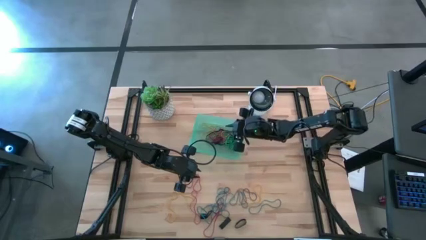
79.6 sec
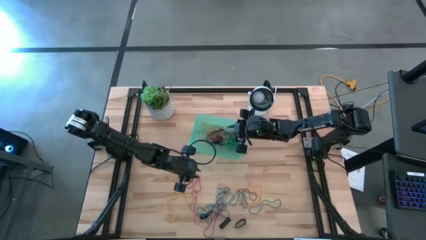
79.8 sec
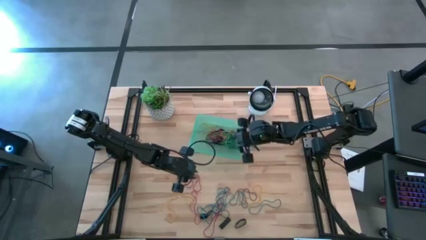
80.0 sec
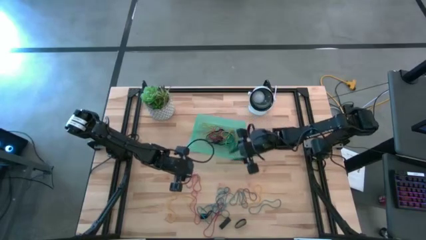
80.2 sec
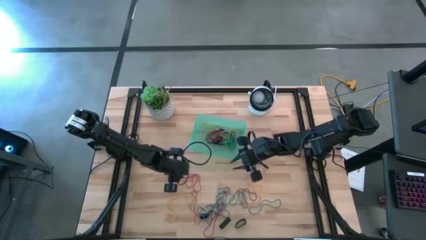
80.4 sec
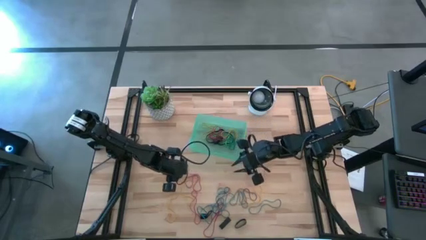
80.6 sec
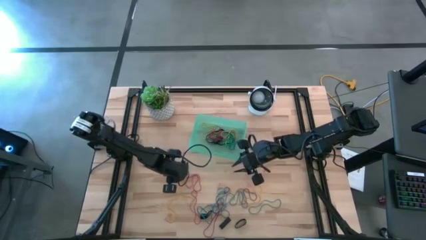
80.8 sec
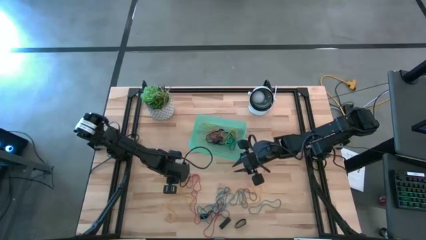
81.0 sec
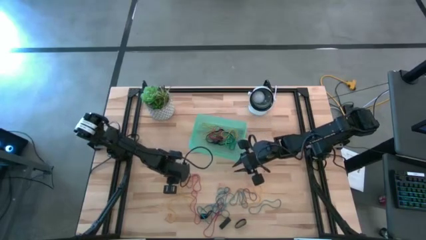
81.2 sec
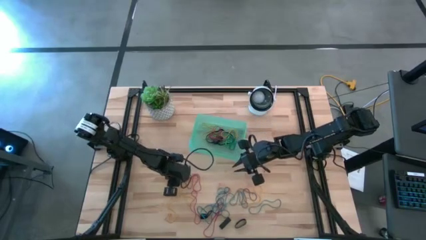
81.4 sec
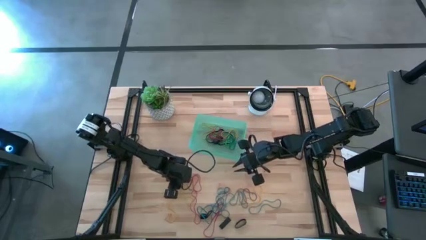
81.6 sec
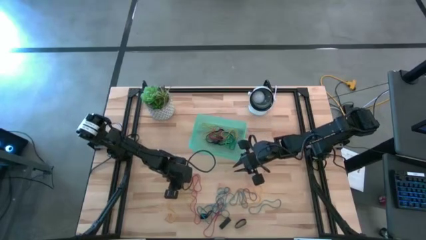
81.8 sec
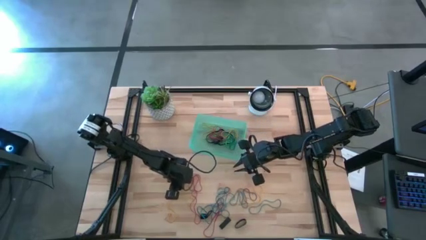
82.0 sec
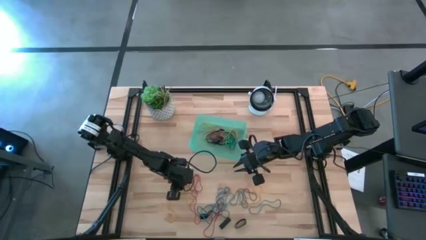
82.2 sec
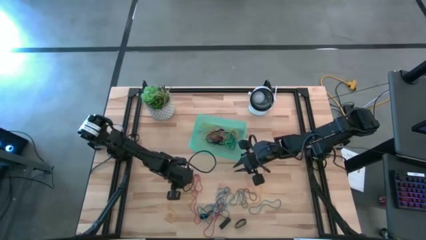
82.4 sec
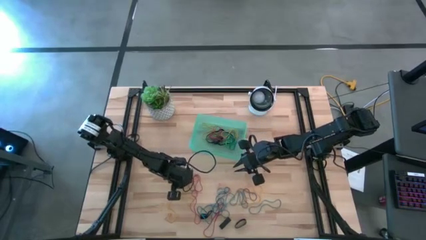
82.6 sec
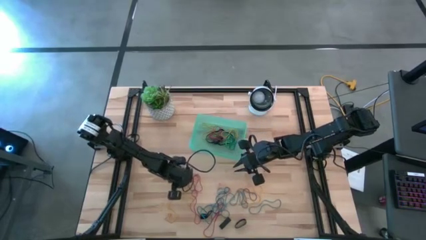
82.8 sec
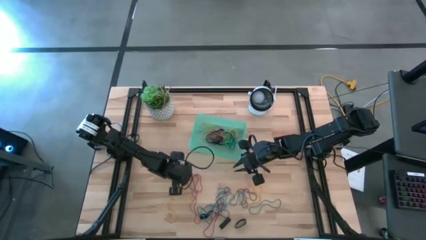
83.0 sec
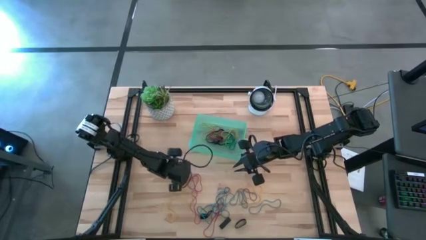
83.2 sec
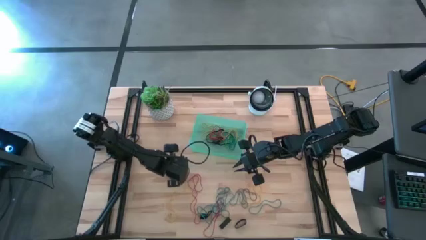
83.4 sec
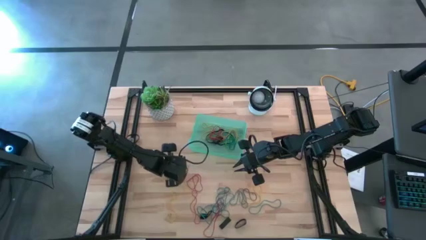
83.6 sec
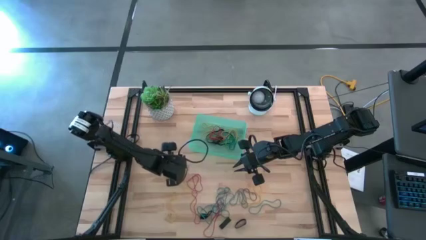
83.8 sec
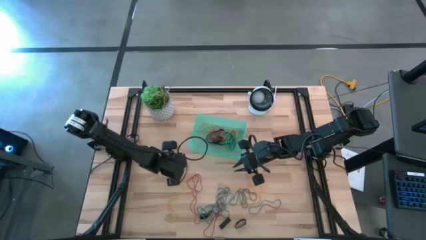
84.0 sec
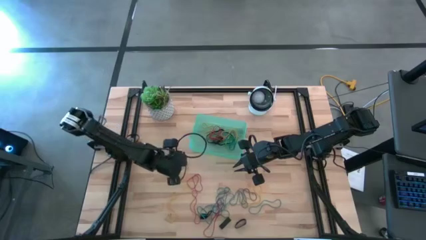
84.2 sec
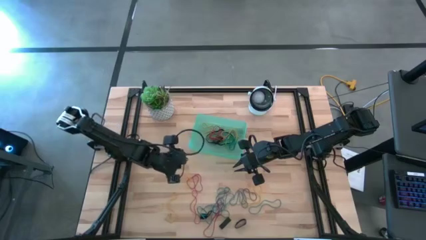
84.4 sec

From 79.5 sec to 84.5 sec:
Task: Pick and place rubber bands into bin
Put the yellow rubber band into the green bin

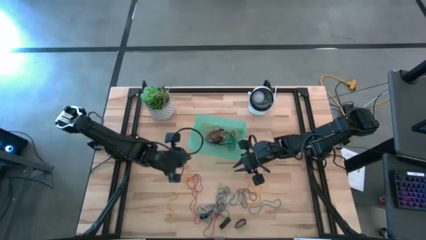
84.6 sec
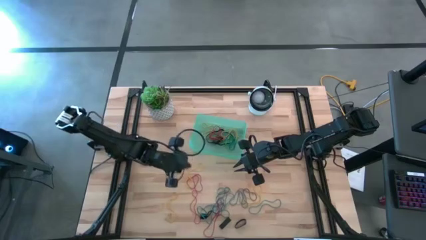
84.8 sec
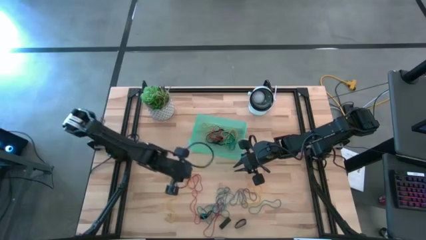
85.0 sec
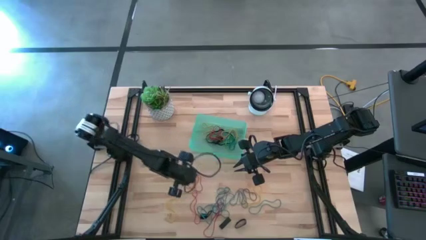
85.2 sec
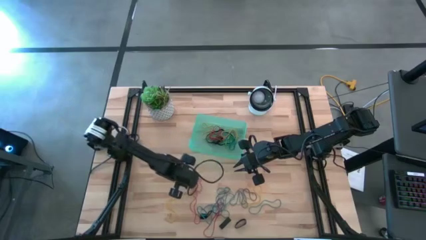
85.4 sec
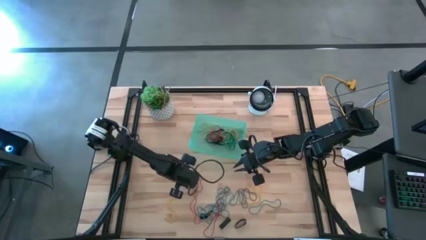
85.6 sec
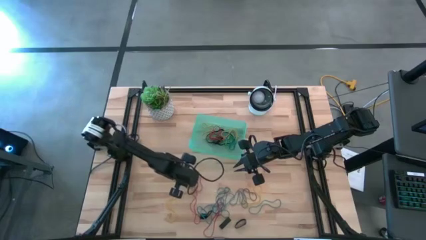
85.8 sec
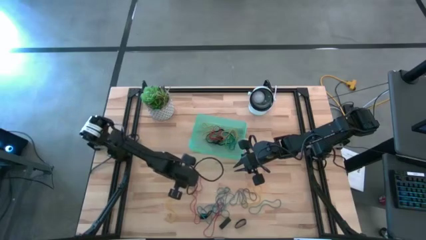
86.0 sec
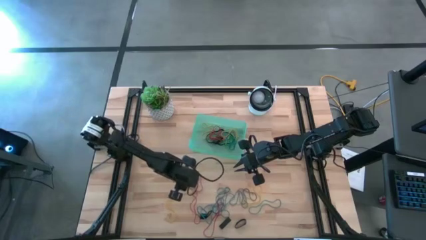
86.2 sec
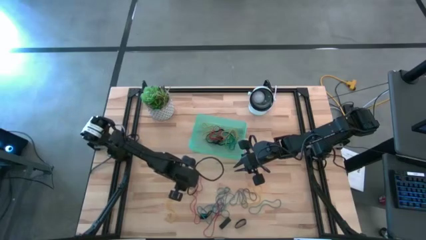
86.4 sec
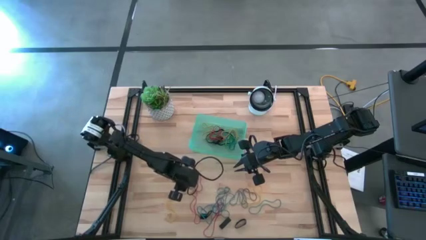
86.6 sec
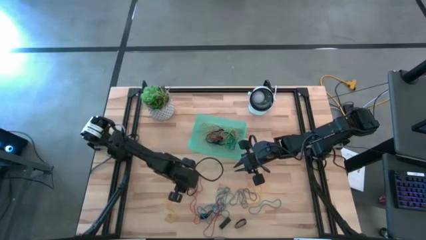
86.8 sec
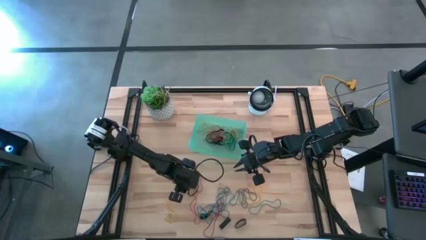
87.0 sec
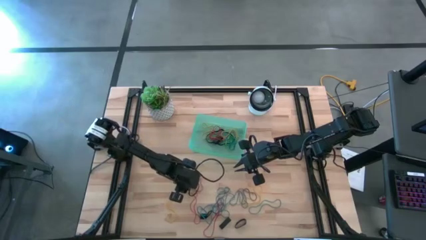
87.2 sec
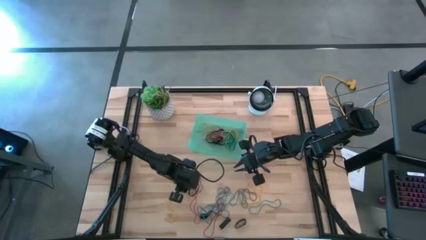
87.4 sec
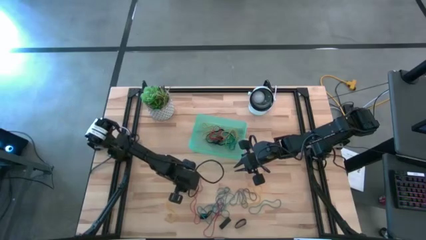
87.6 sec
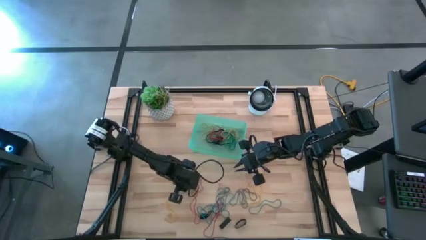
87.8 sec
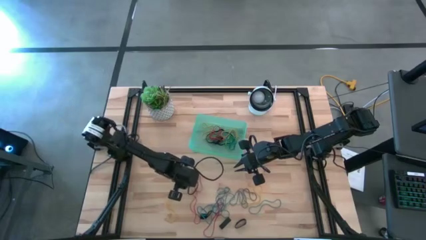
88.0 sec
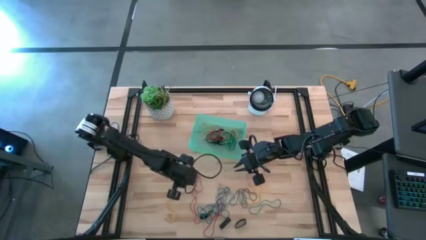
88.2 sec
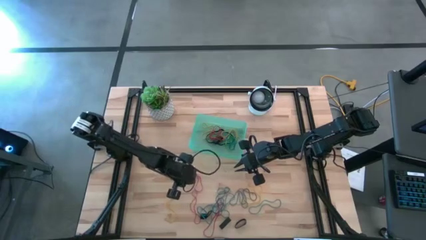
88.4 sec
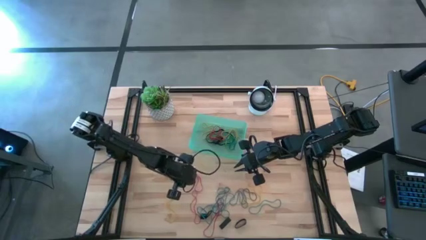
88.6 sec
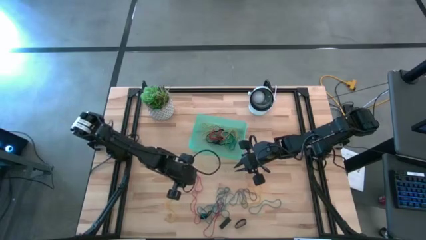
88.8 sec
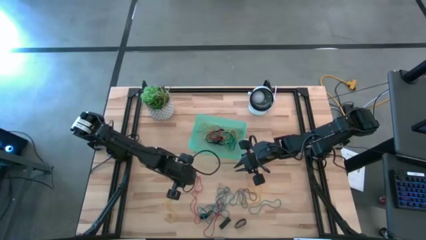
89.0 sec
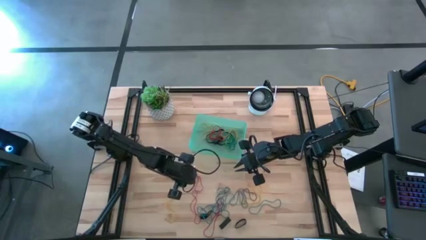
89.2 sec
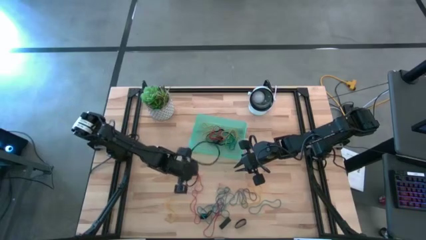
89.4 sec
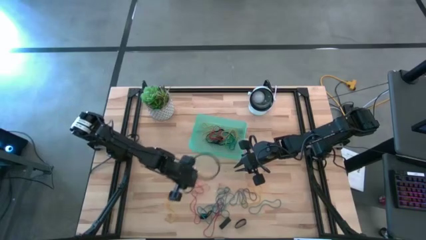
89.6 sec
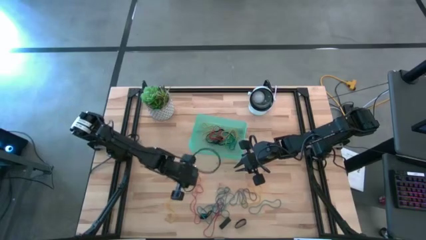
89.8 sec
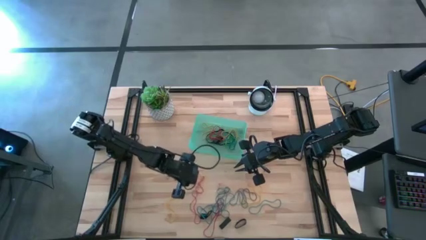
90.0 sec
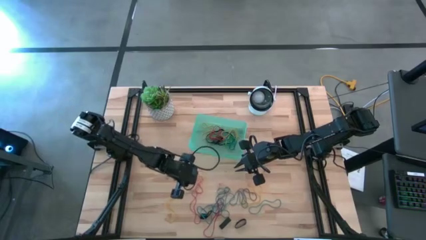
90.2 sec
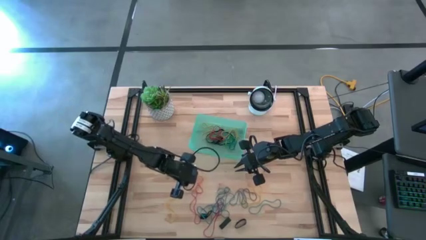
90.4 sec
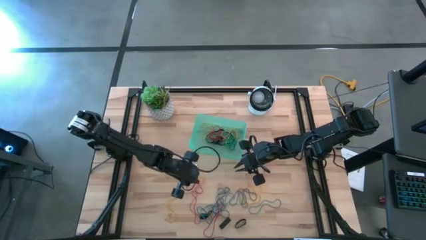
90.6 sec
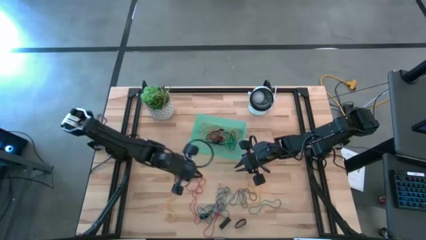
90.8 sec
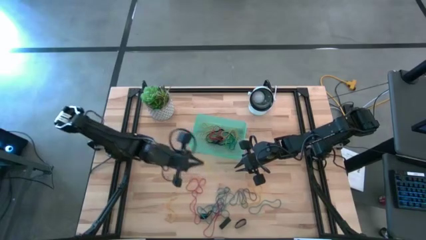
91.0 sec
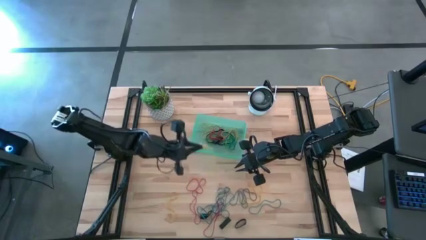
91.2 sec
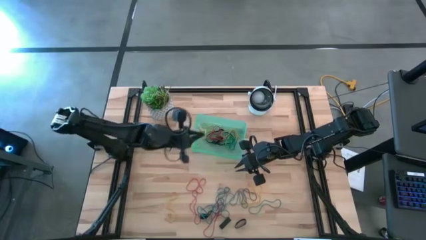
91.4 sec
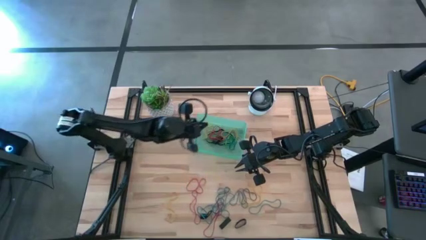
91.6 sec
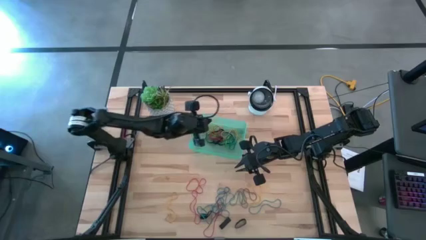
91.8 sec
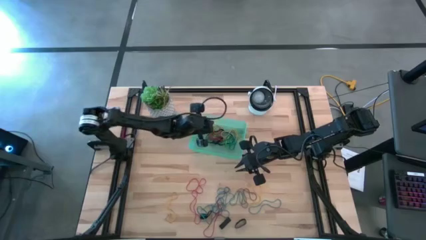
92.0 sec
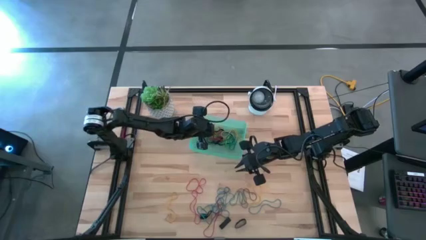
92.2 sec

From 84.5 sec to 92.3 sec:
Put the yellow rubber band into the green bin

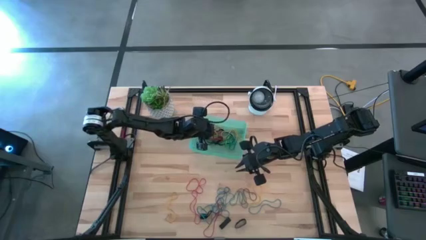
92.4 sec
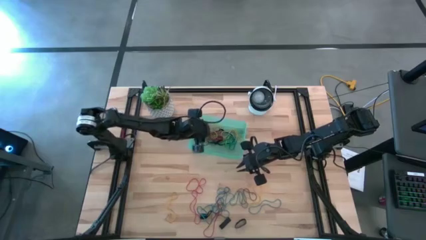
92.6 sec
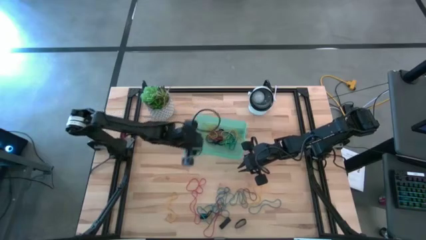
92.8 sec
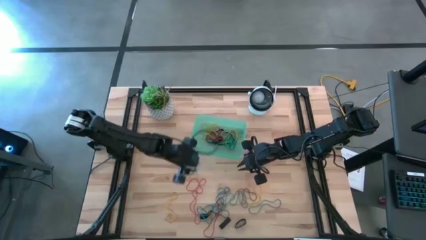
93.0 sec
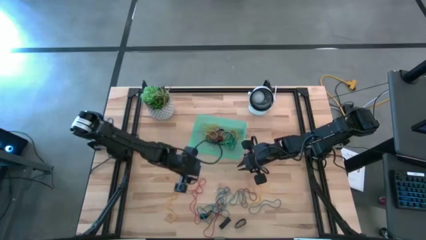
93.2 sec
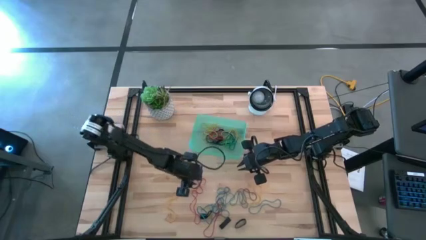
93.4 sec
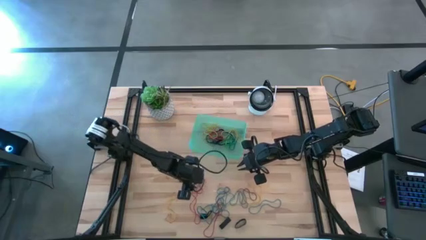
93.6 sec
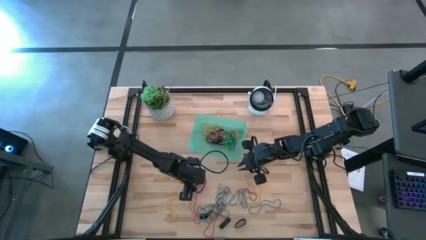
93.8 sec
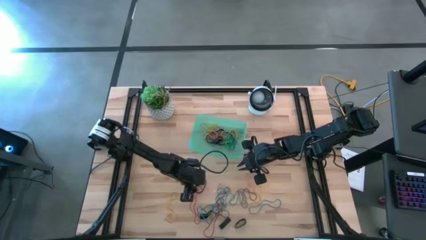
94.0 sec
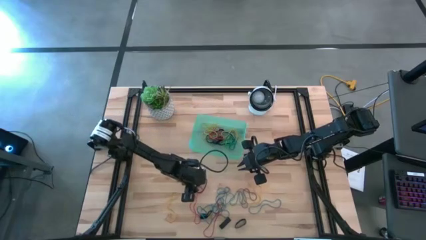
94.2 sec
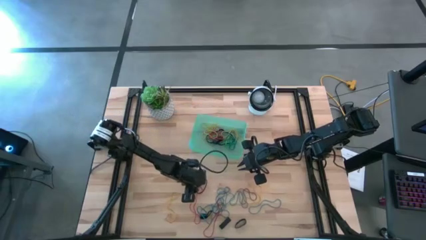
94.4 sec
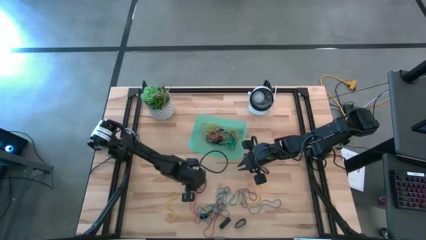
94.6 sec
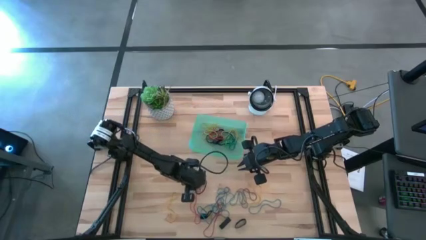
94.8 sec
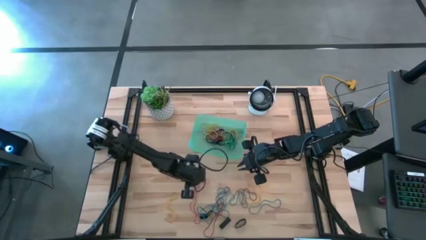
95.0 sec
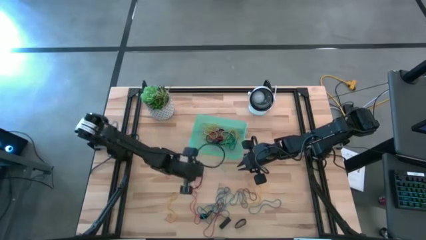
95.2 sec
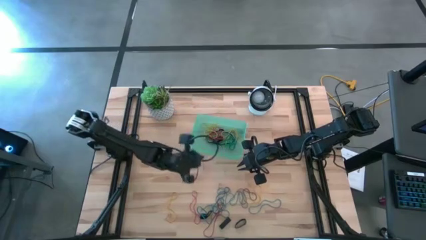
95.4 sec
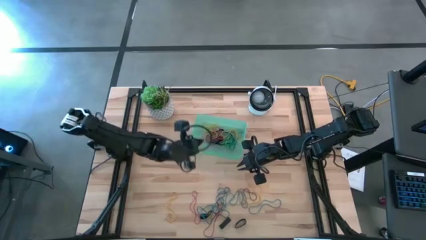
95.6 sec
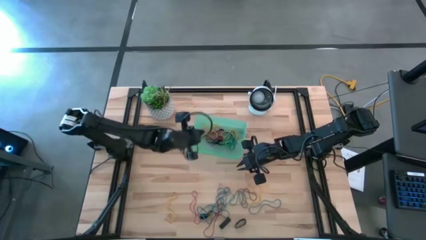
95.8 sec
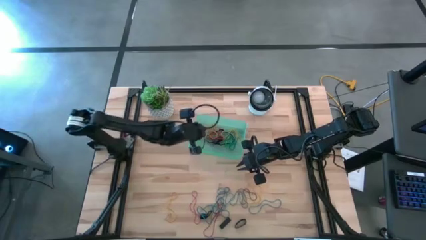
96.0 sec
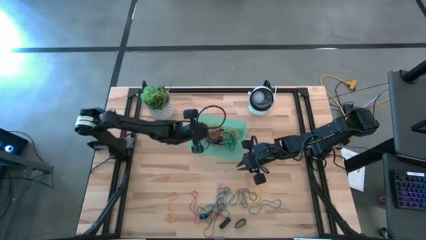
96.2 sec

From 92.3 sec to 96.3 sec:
Put the red rubber band into the green bin
